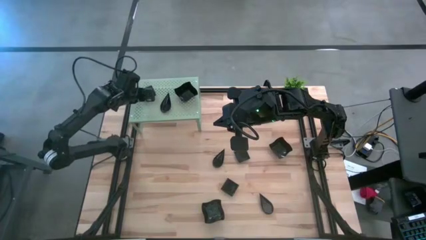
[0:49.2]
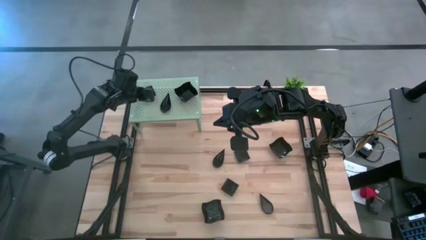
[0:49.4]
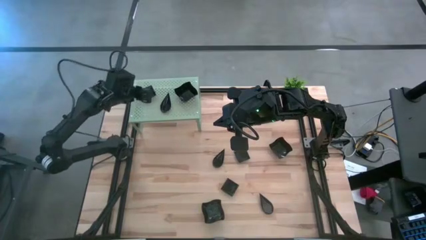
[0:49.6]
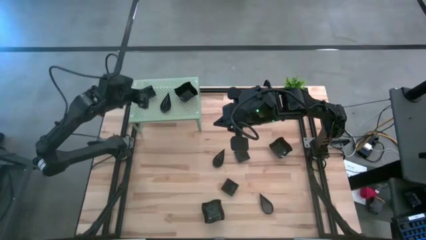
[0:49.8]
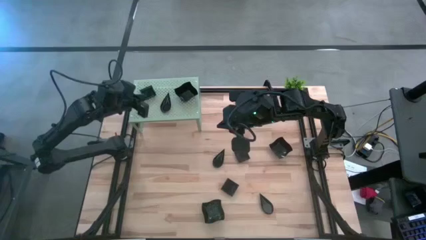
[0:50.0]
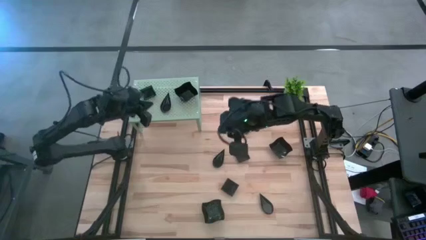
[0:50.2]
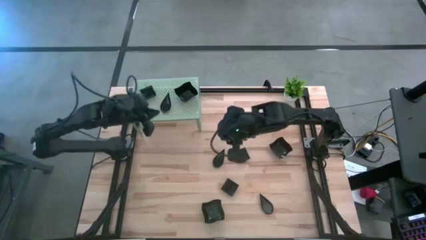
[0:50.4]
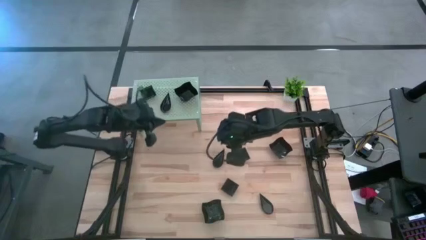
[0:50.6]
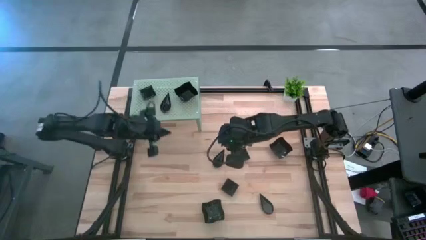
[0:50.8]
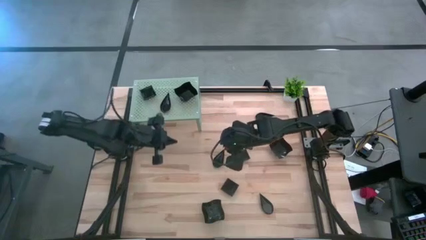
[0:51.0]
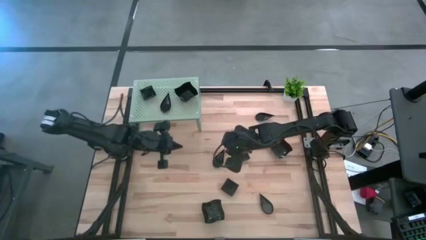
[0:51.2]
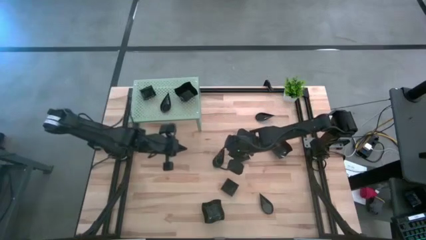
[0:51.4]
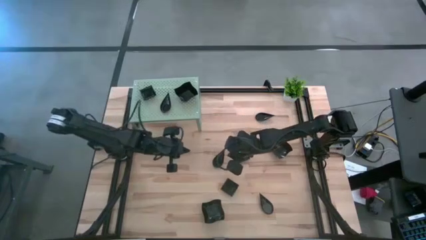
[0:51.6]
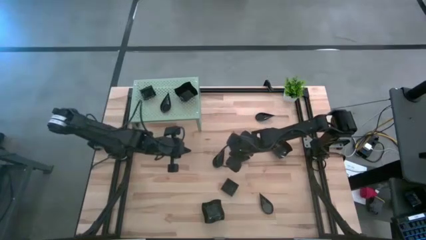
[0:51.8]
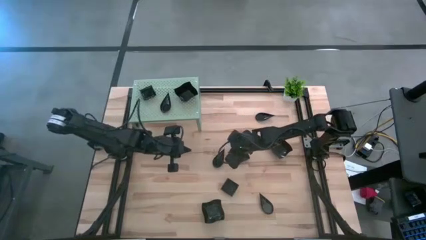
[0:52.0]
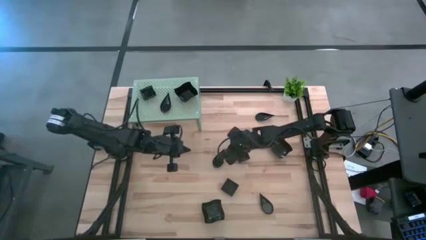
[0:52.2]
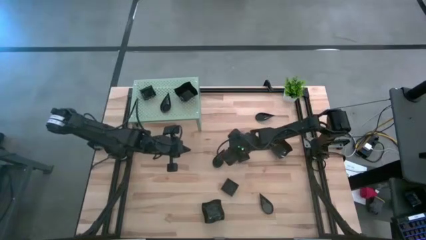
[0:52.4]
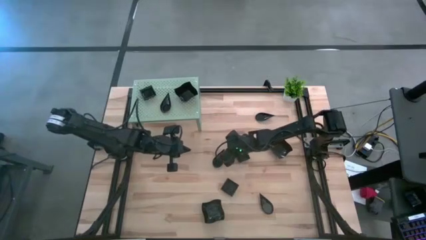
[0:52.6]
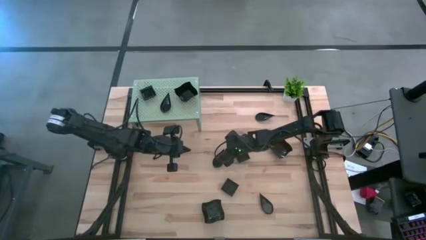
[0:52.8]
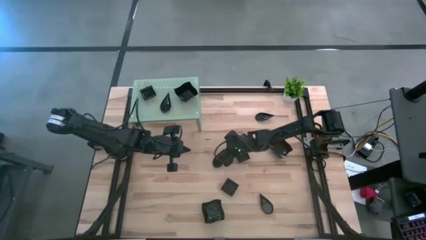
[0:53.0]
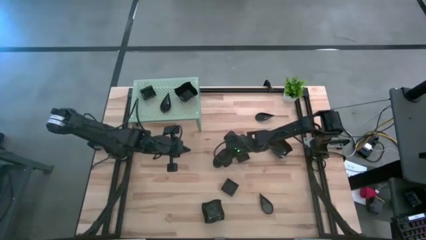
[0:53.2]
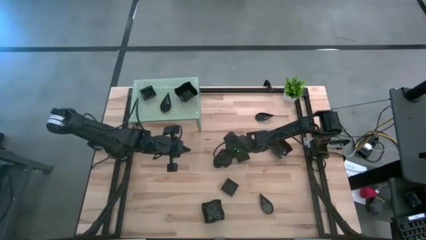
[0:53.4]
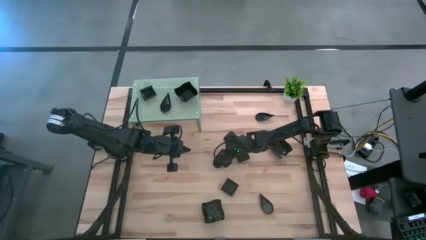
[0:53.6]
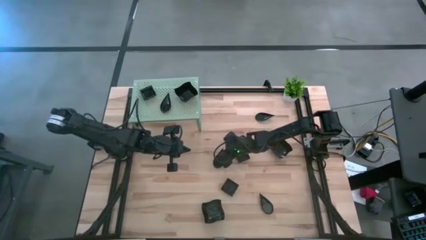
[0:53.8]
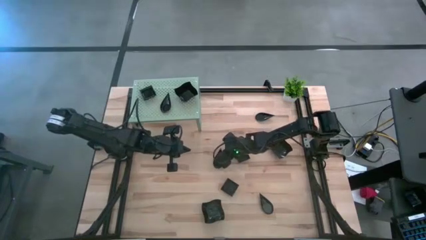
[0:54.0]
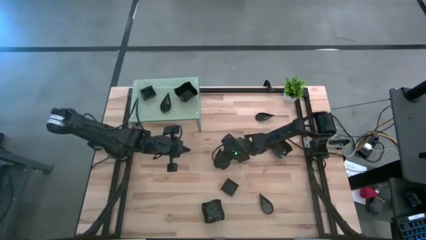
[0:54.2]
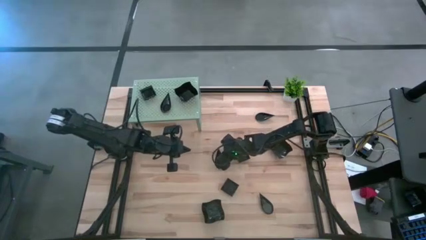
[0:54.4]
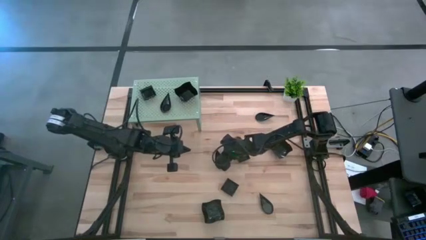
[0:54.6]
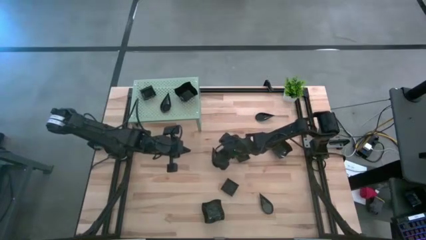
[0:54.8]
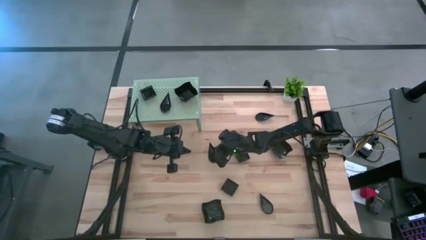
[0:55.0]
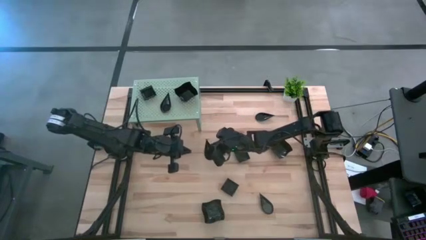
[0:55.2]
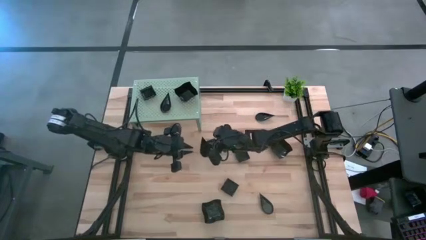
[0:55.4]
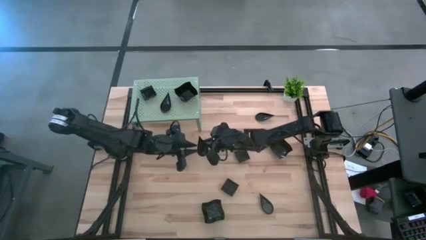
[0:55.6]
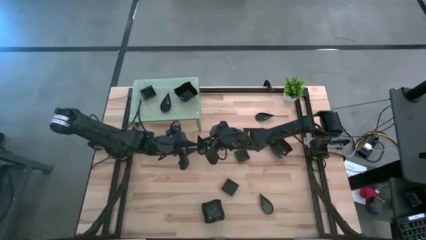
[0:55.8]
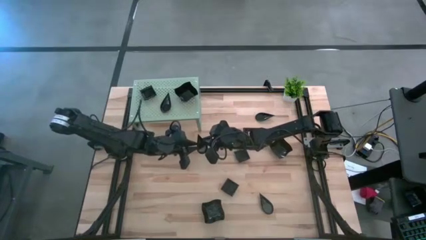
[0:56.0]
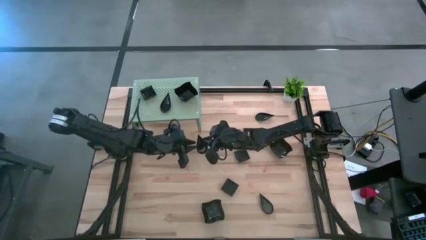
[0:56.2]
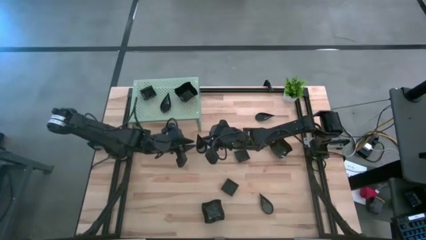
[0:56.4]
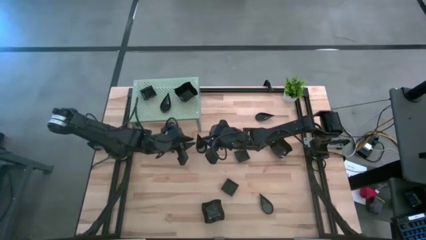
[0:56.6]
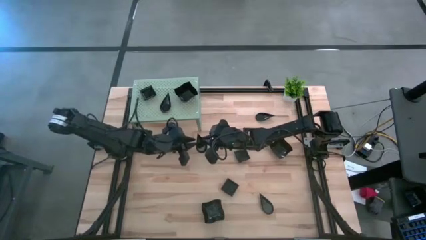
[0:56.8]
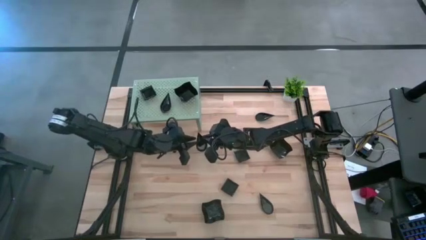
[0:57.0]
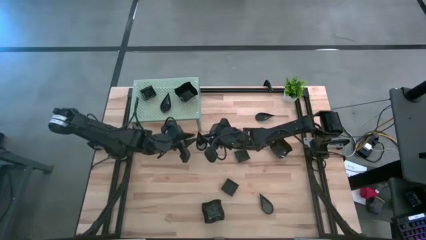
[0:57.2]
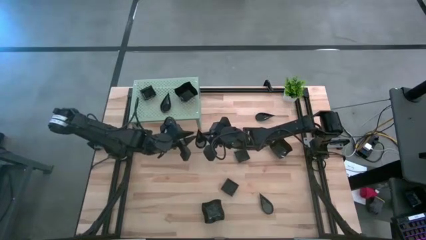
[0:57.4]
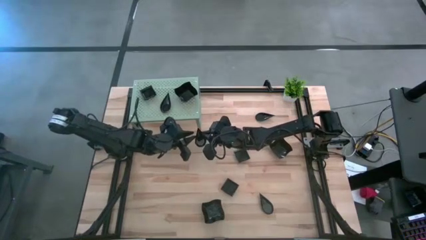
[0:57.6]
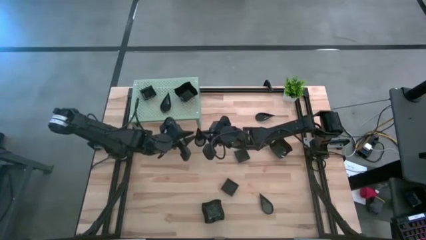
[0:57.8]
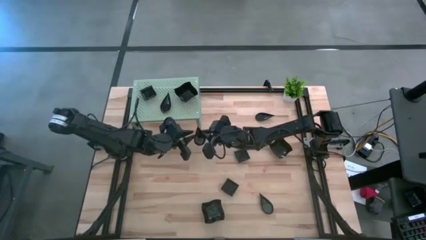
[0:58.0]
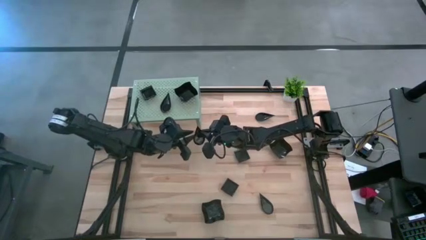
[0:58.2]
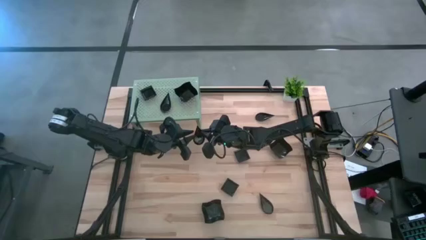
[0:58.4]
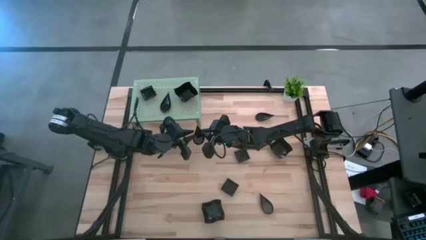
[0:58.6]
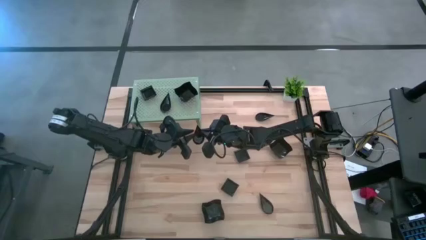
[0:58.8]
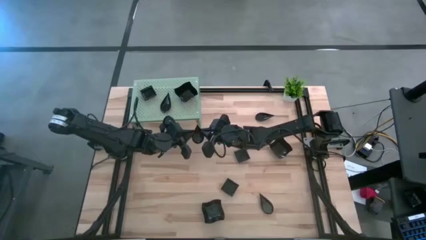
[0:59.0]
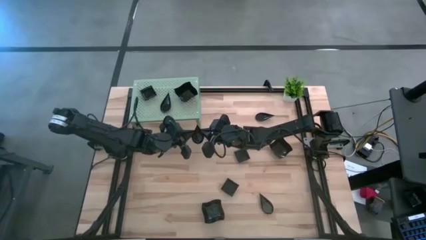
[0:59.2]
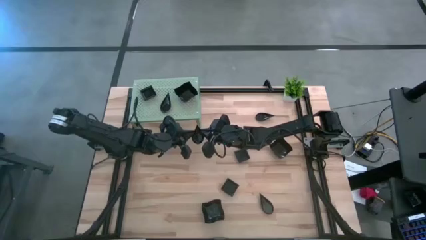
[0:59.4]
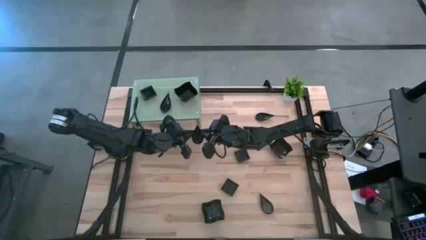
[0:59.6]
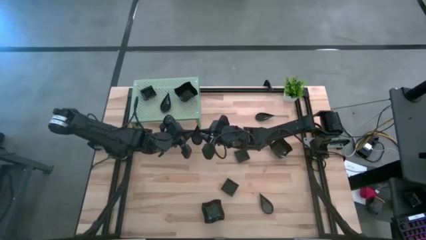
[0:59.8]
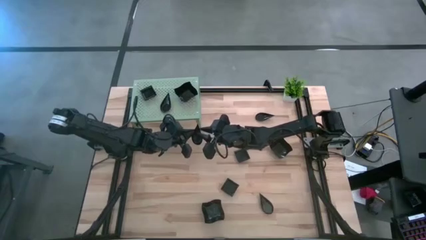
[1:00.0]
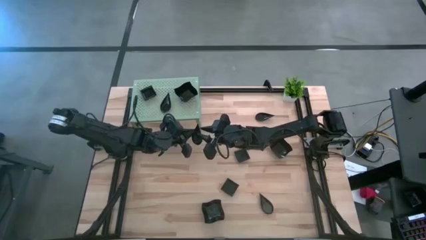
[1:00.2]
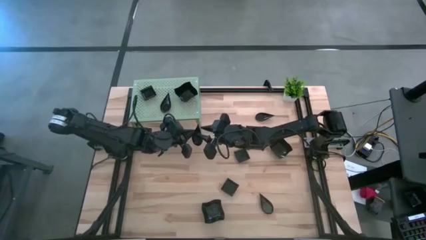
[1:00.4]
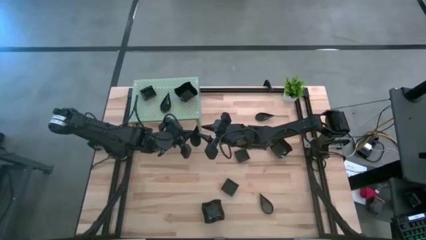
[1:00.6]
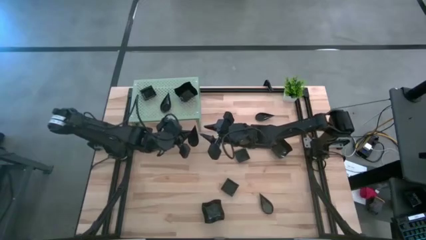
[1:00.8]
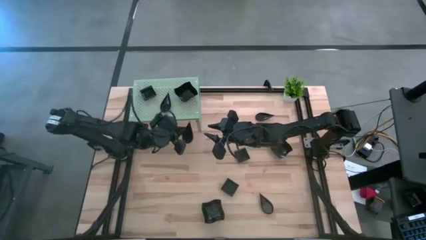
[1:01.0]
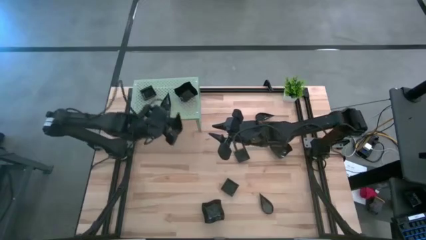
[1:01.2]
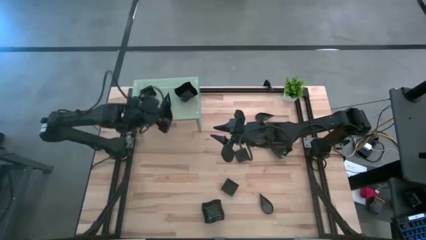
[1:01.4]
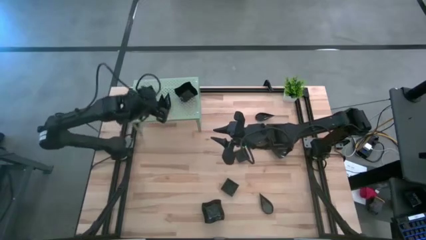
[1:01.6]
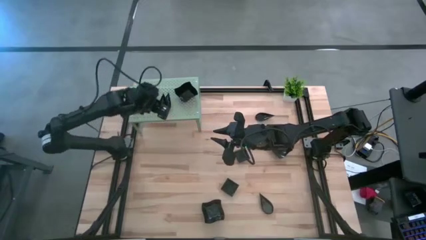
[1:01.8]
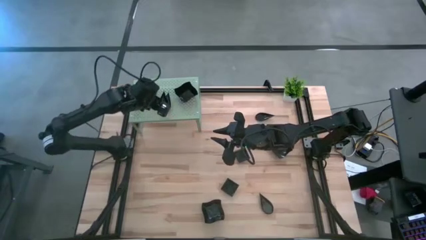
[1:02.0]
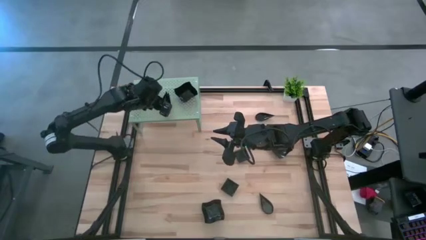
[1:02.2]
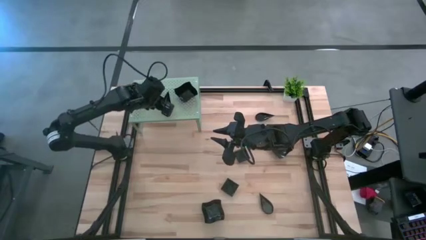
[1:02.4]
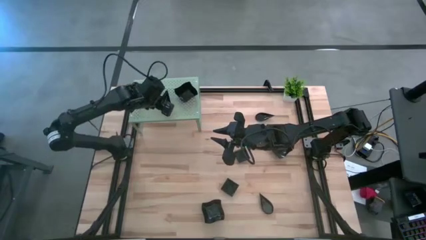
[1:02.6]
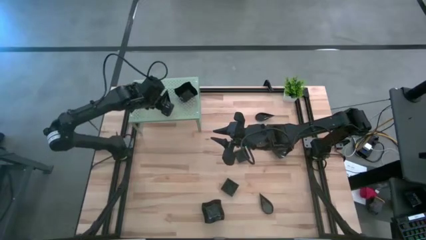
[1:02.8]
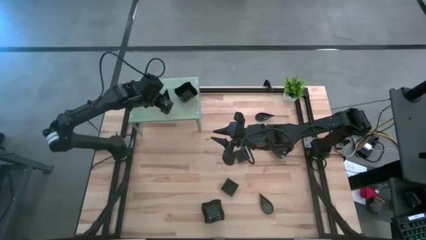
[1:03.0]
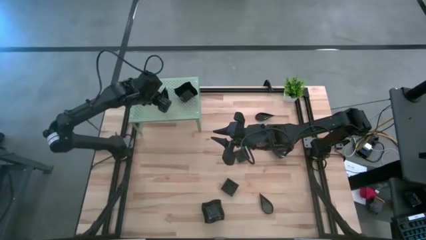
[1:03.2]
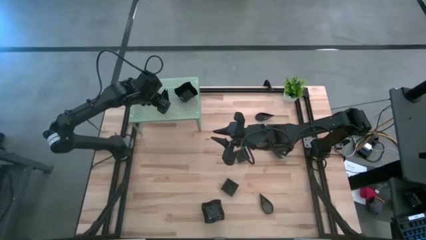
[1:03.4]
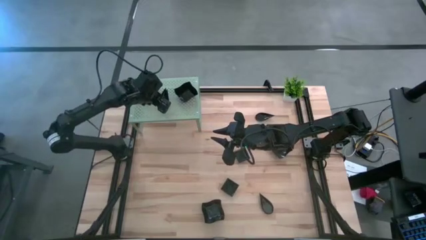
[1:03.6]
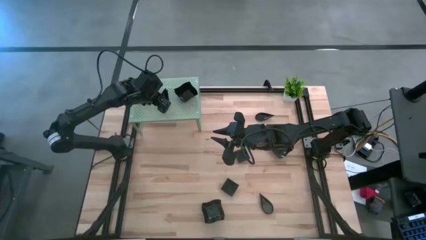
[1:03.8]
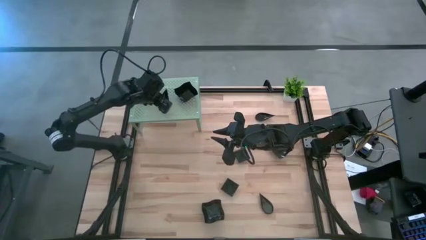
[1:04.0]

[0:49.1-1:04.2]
Task: Pick & Place Mini shaped plates
Stack the black drop-shaped plate on top of the black drop-shaped plate on the shelf
